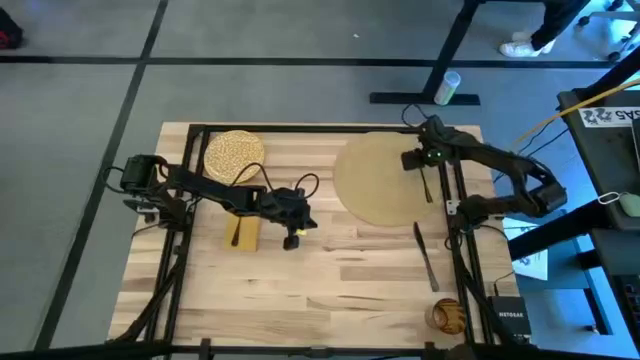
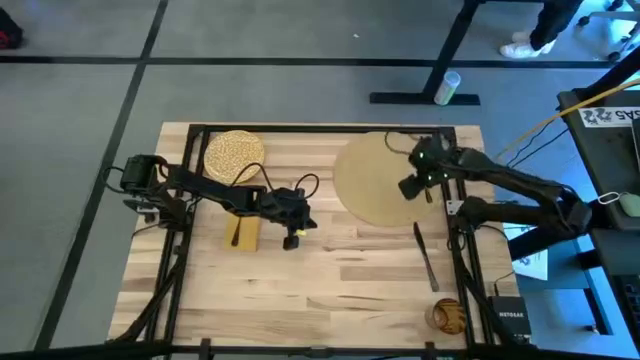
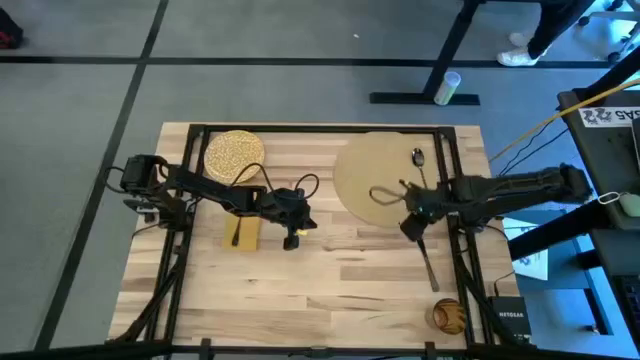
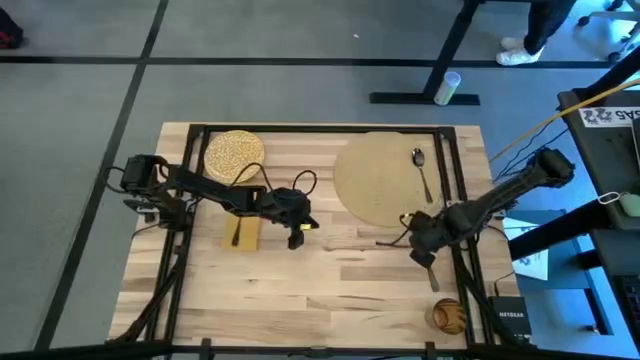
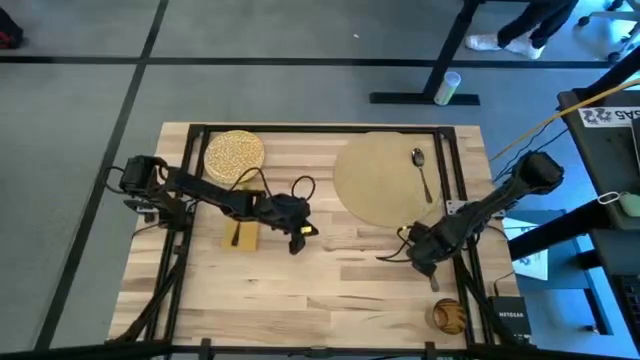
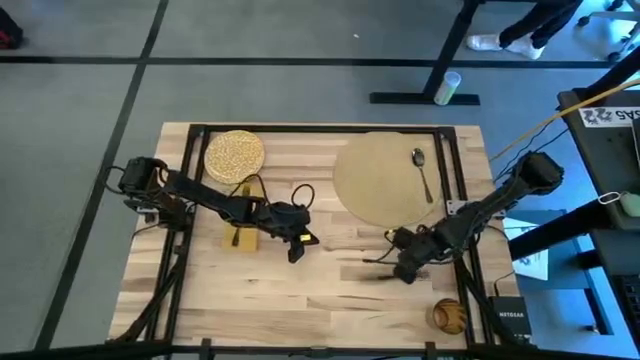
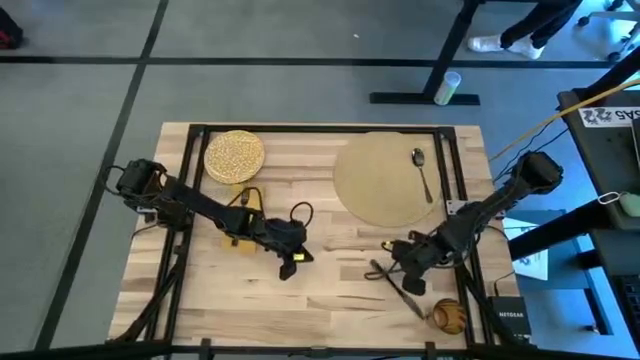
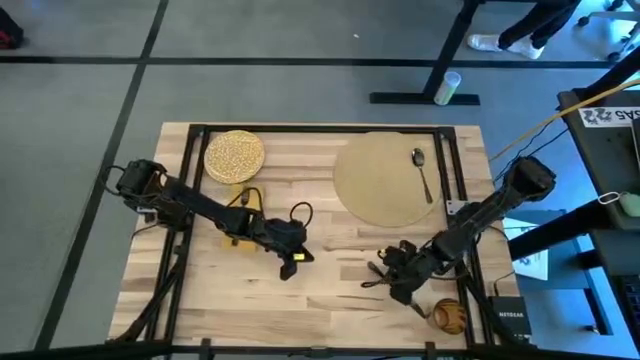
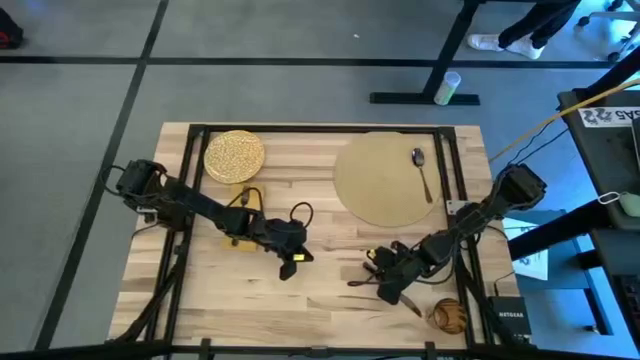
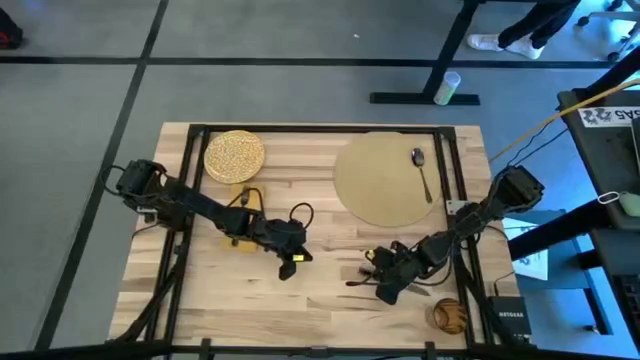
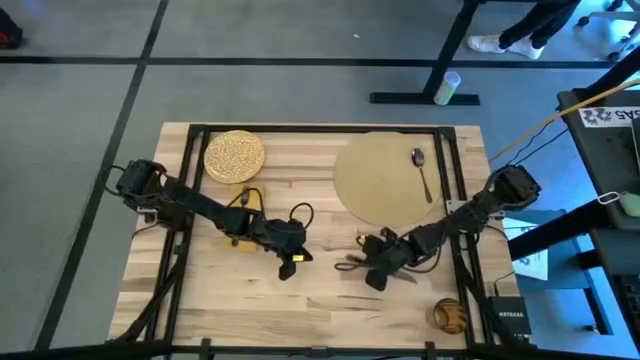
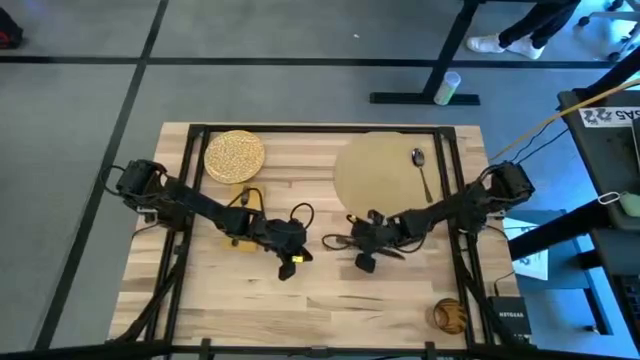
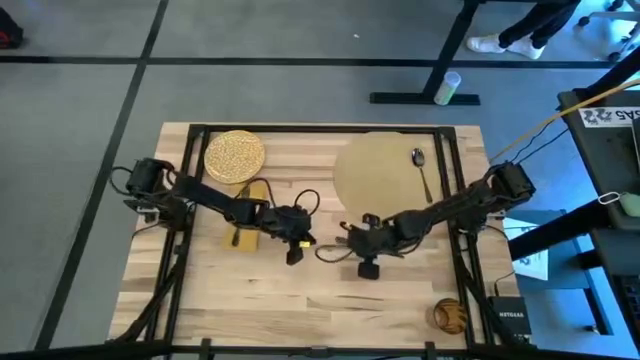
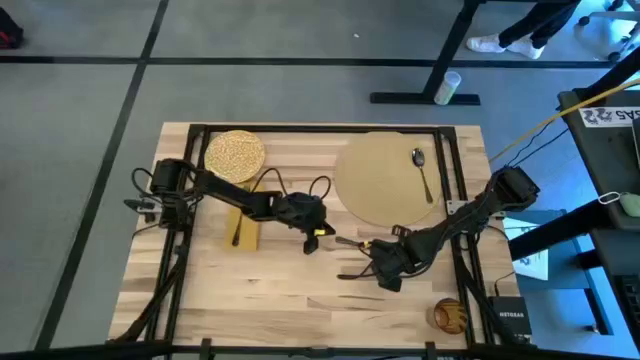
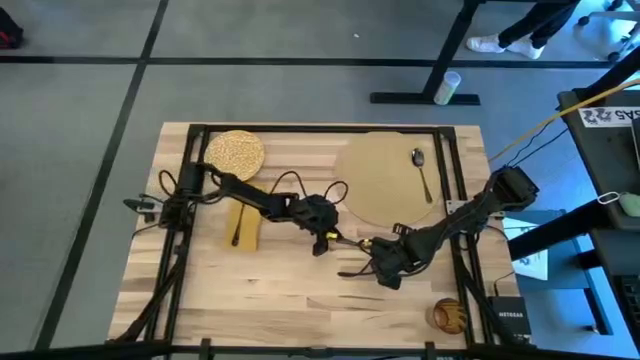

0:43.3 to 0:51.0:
Task: Set table place
Put the knife to the left of the spoon on the woven mat

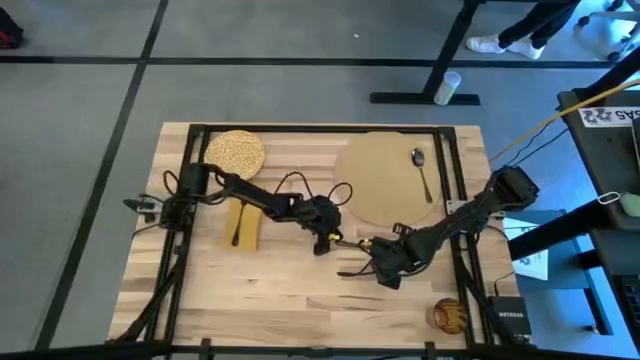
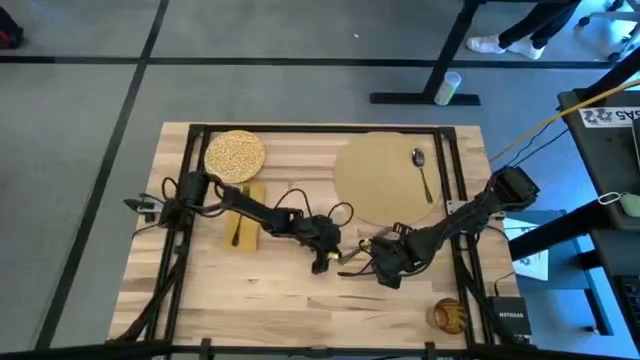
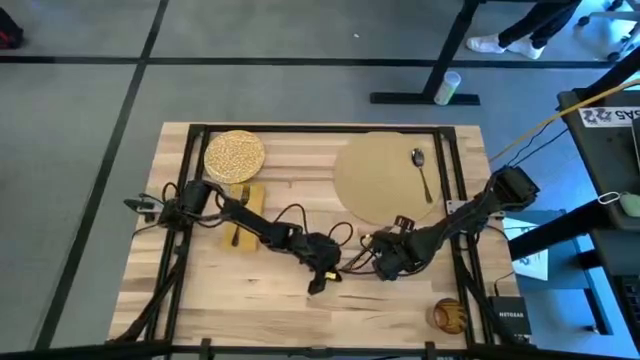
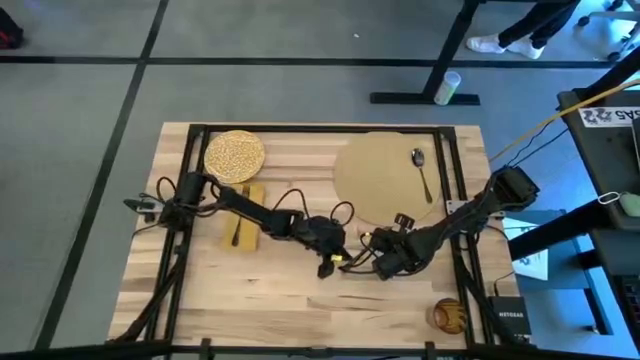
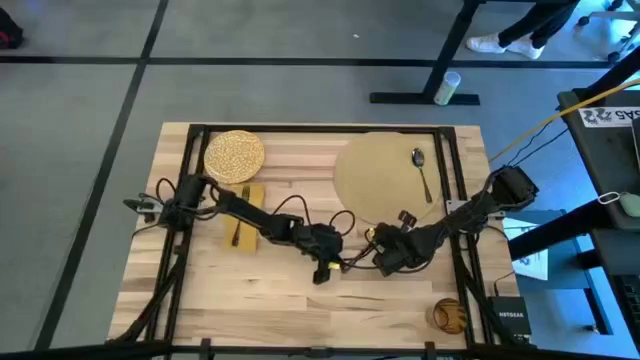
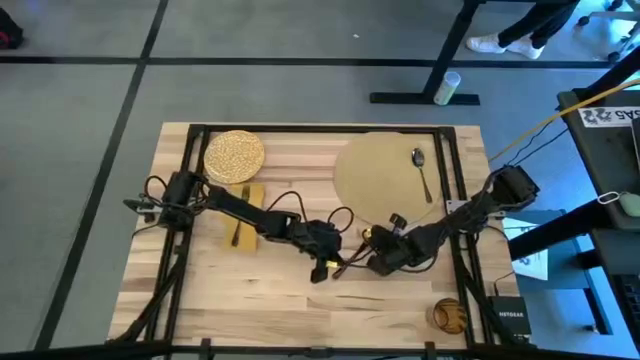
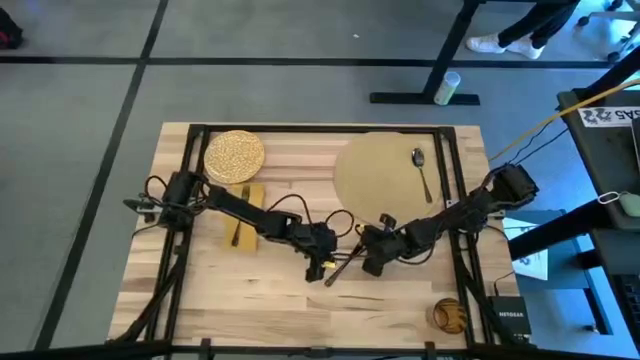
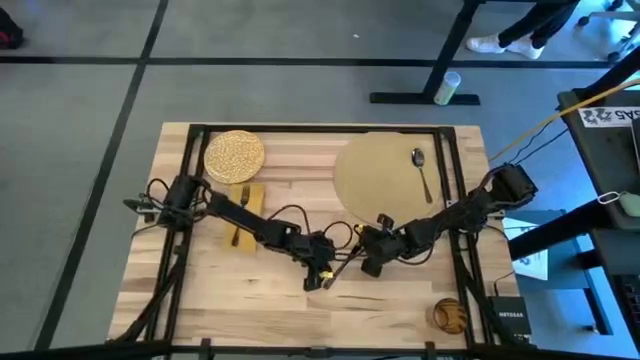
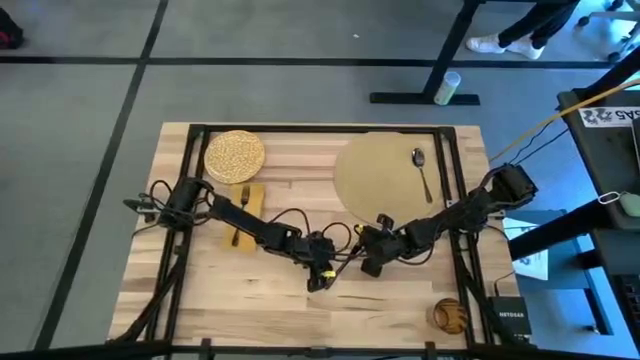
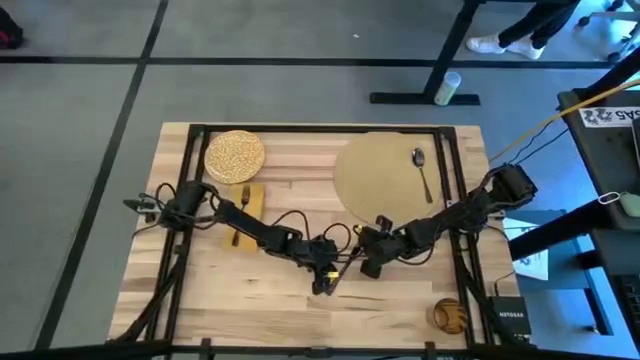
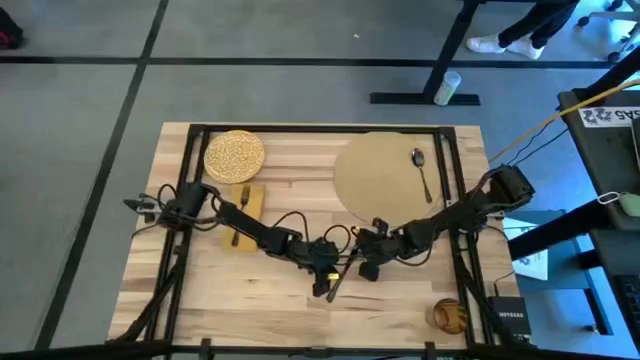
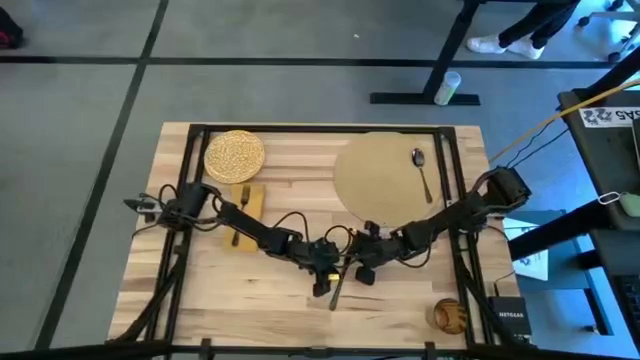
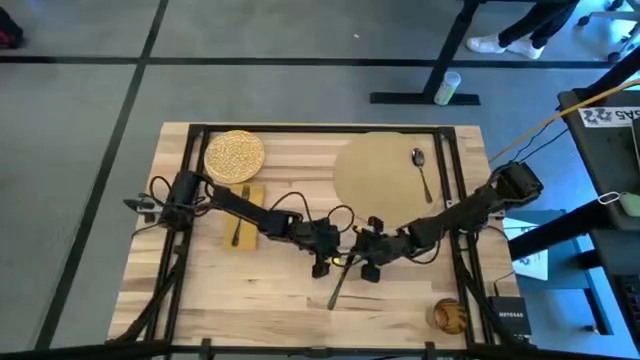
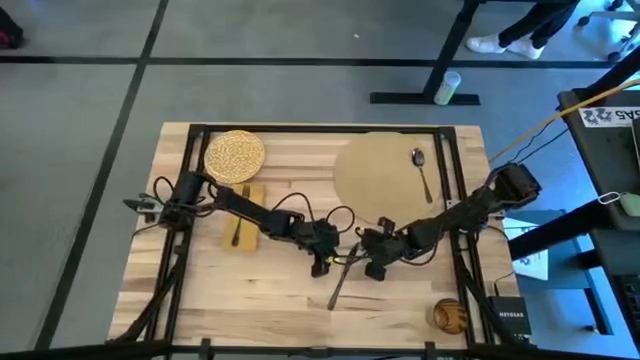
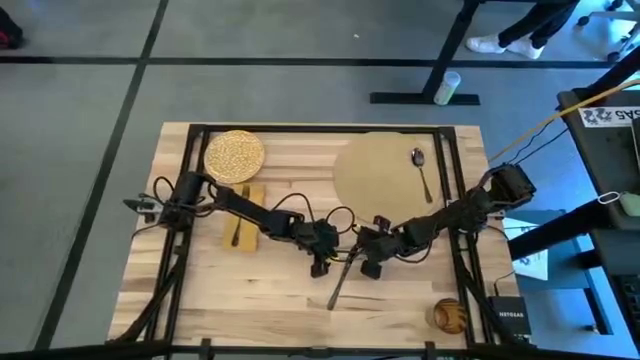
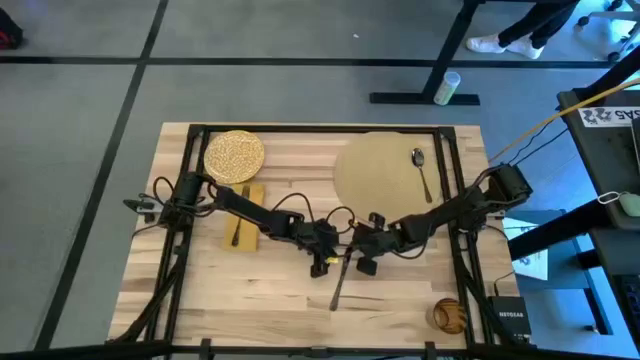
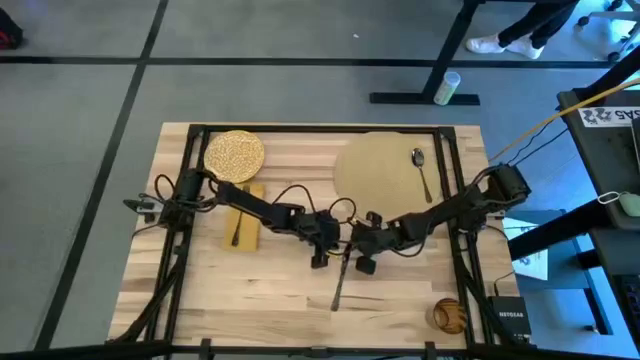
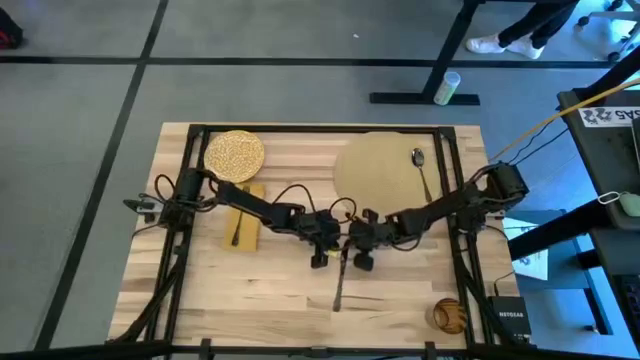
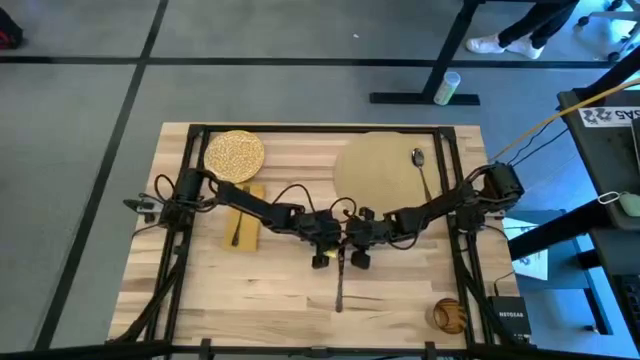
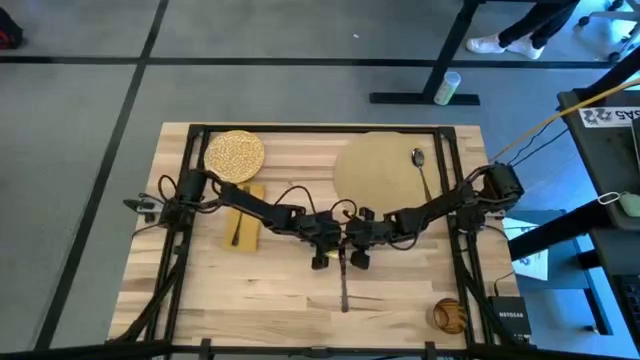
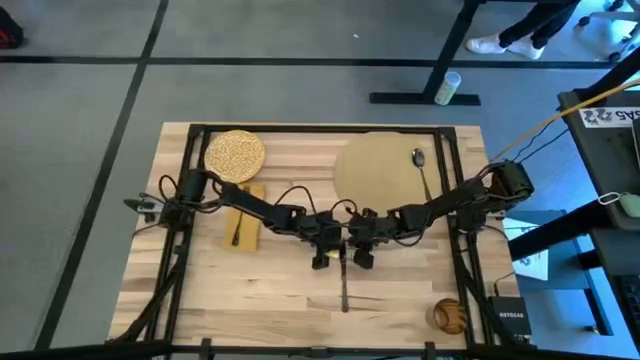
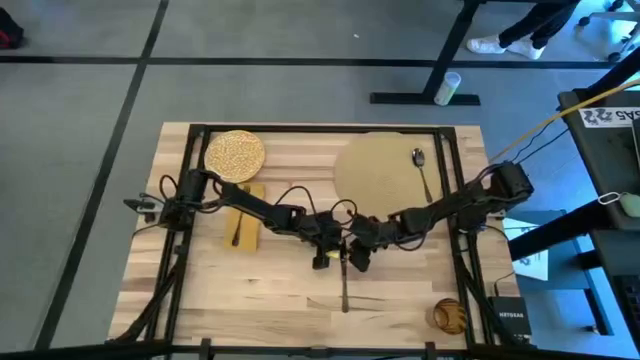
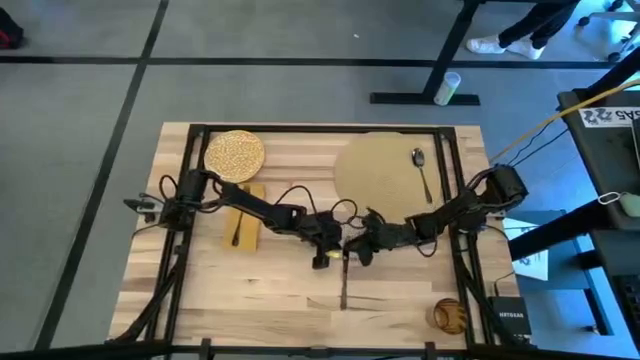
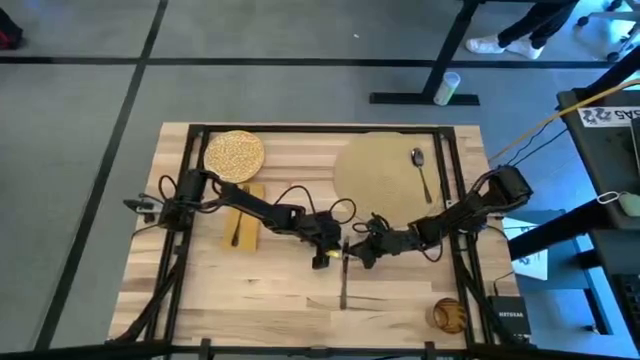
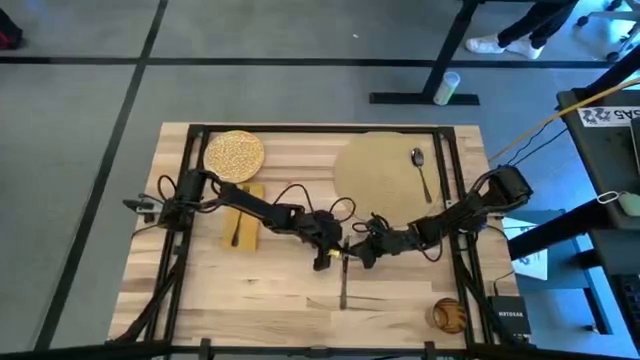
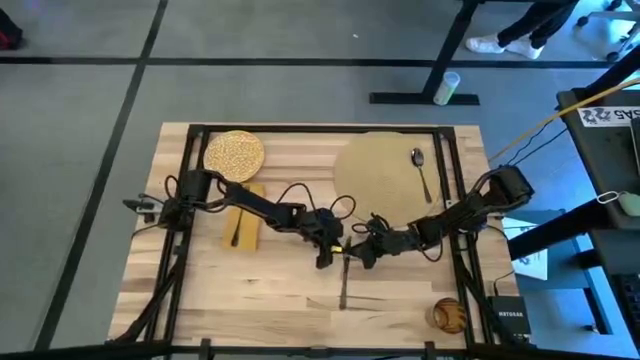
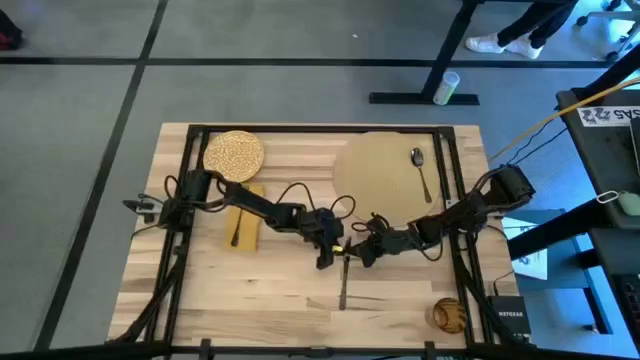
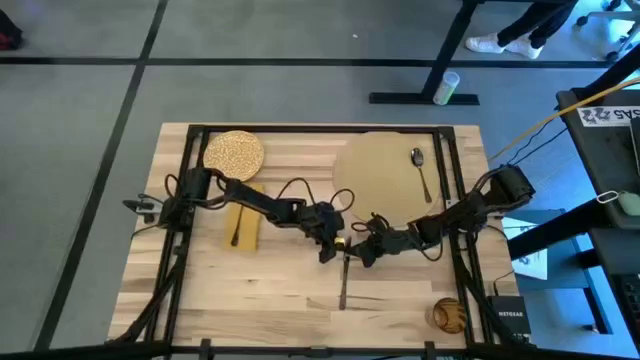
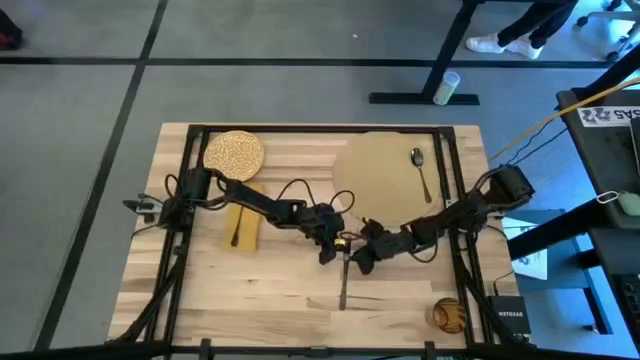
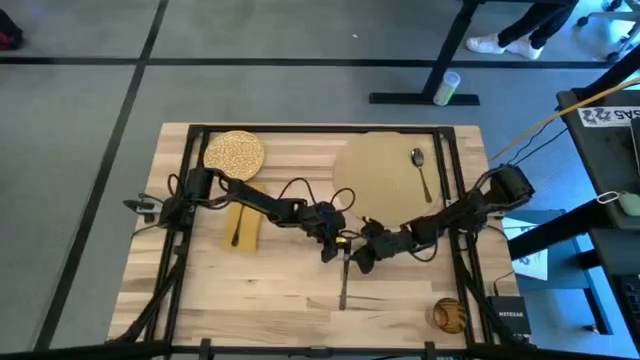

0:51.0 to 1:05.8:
Put the knife to the left of the spoon on the woven mat
